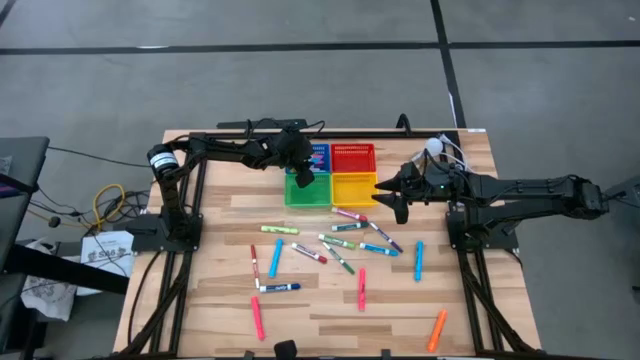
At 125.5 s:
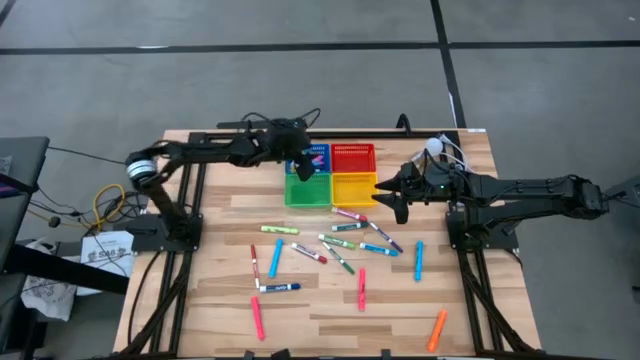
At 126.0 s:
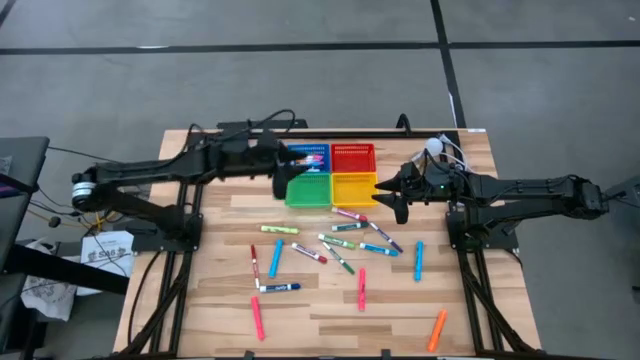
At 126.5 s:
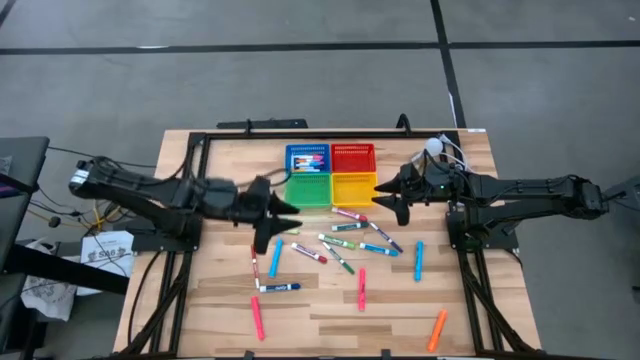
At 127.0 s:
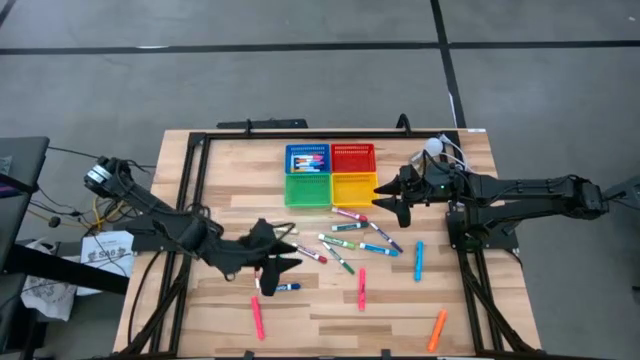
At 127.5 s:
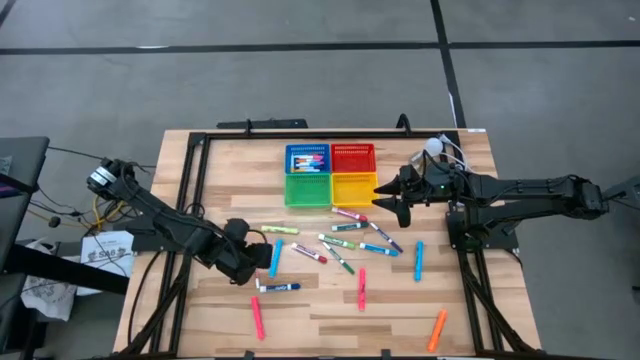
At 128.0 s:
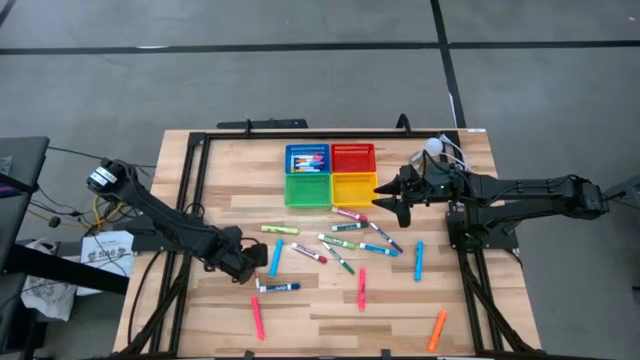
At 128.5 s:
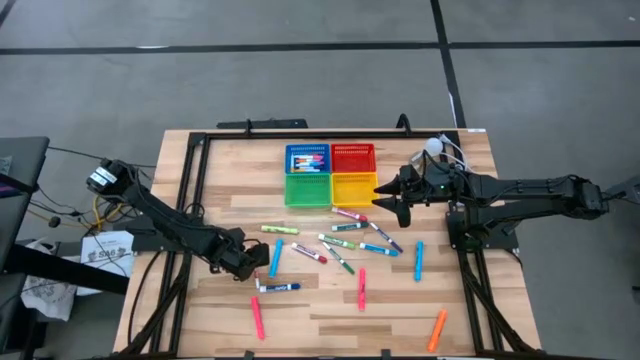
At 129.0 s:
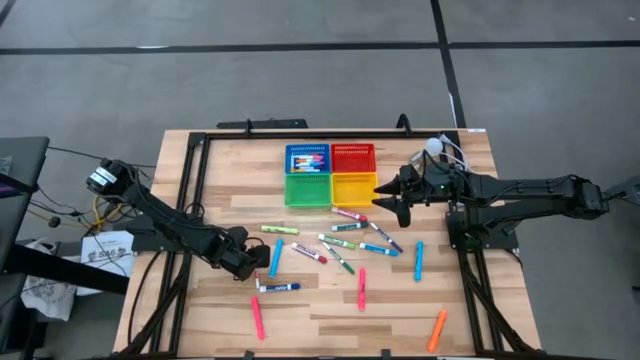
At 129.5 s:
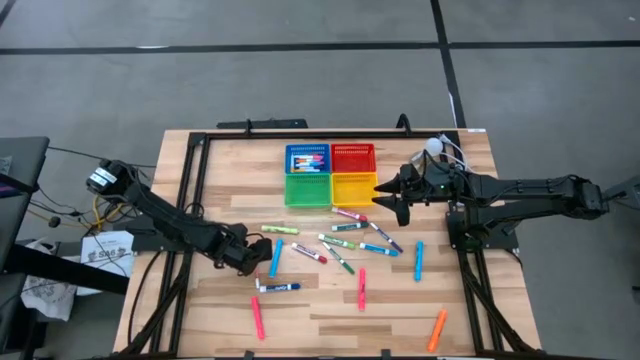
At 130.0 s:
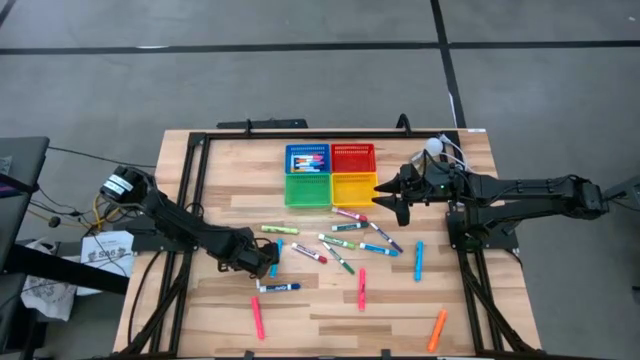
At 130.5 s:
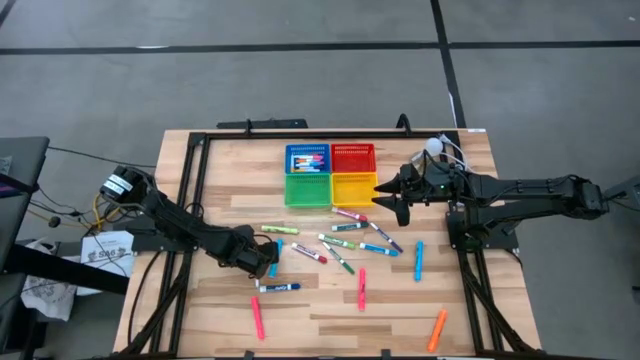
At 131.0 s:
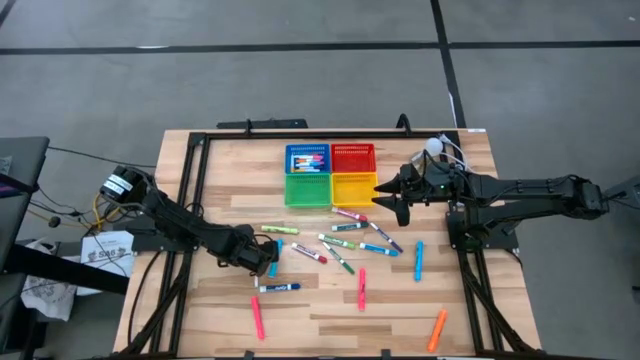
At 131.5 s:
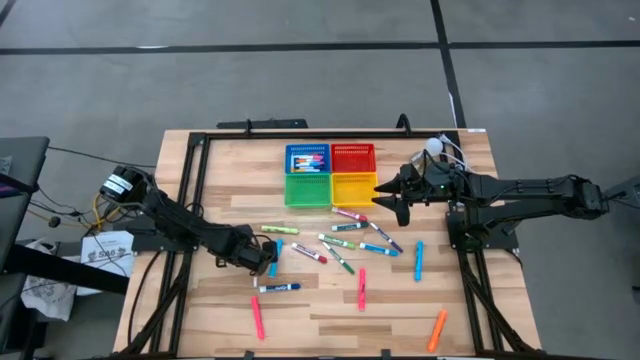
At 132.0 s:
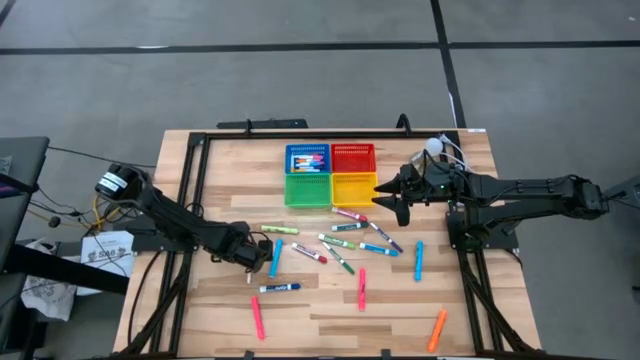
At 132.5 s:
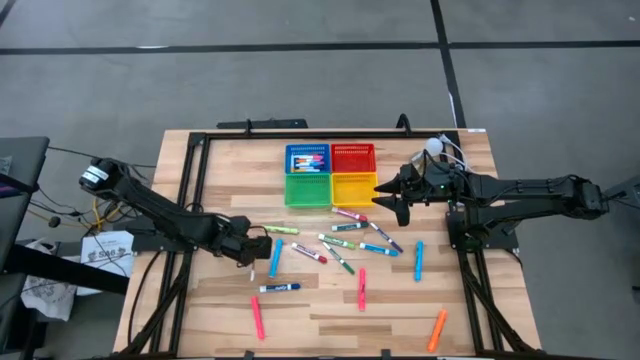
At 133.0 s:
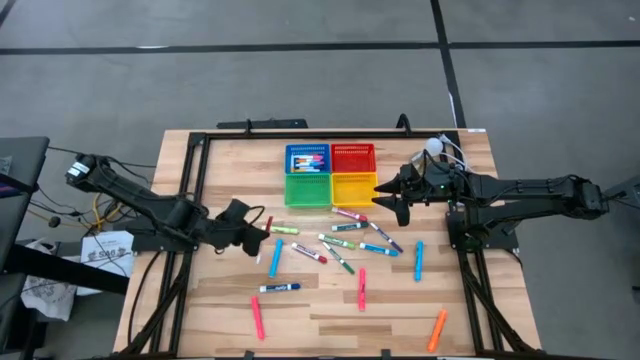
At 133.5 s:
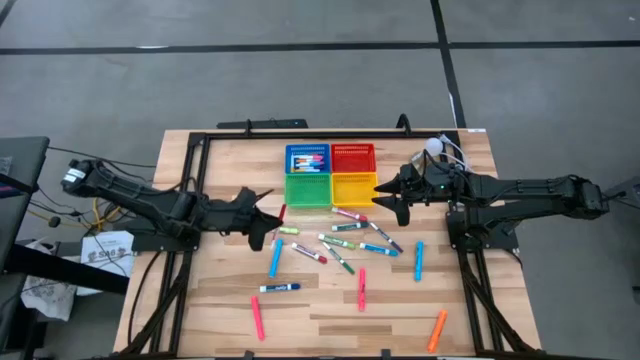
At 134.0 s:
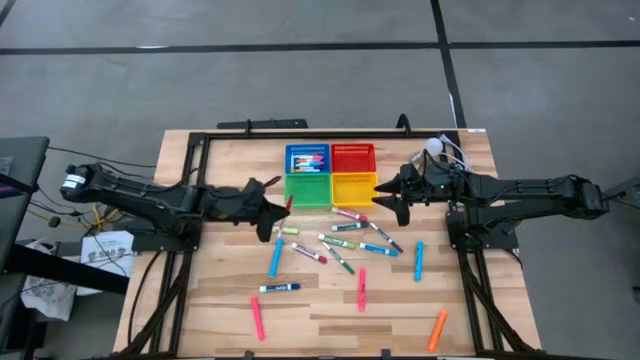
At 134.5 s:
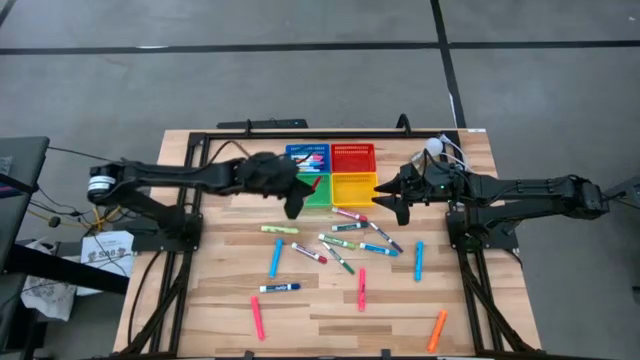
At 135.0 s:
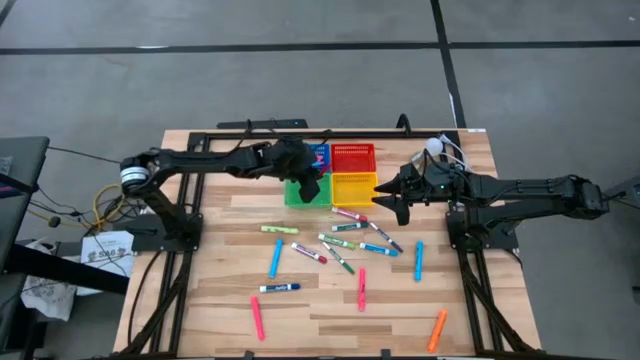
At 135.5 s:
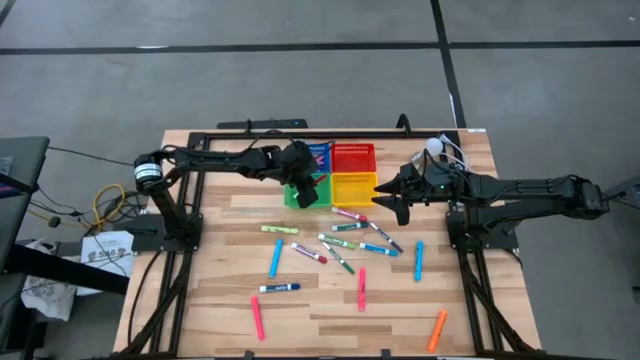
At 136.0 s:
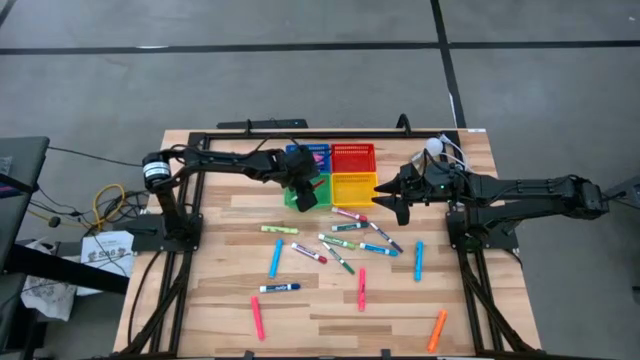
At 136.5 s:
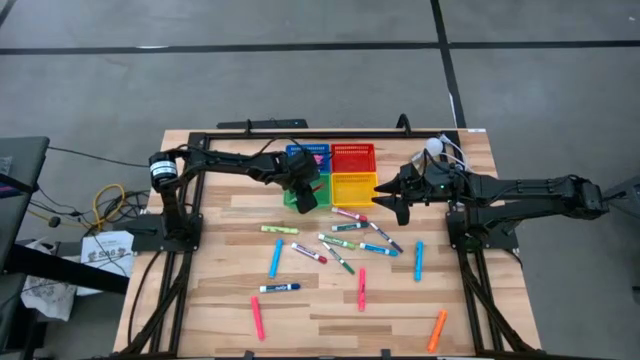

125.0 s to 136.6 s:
Task: Pick & Place Markers
Put the medium red marker into the green bin

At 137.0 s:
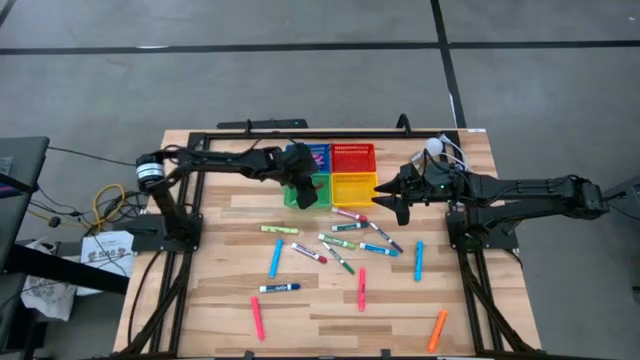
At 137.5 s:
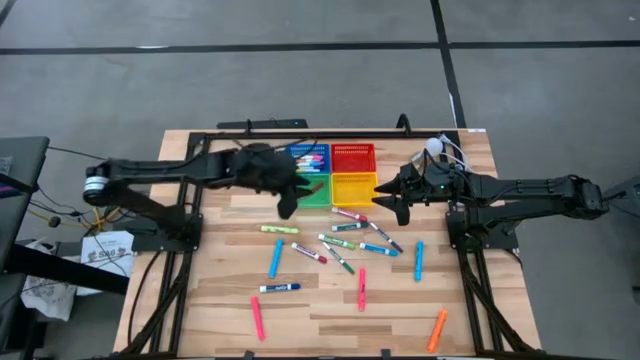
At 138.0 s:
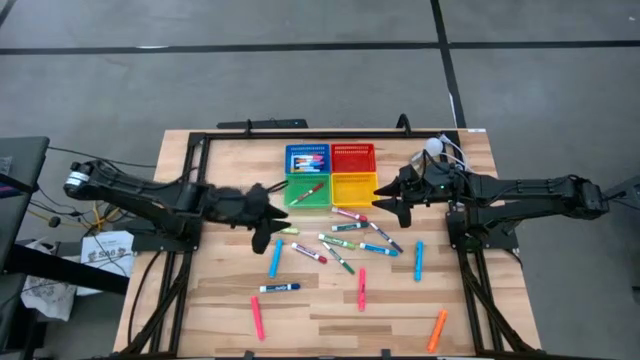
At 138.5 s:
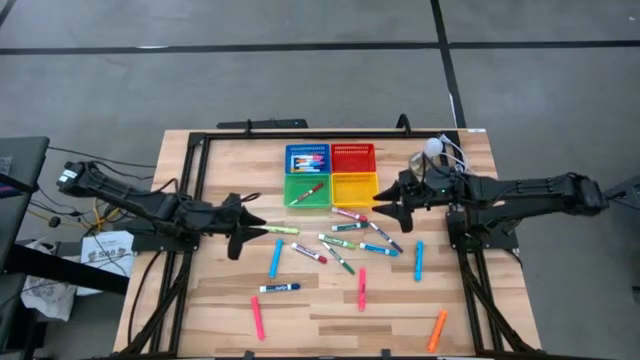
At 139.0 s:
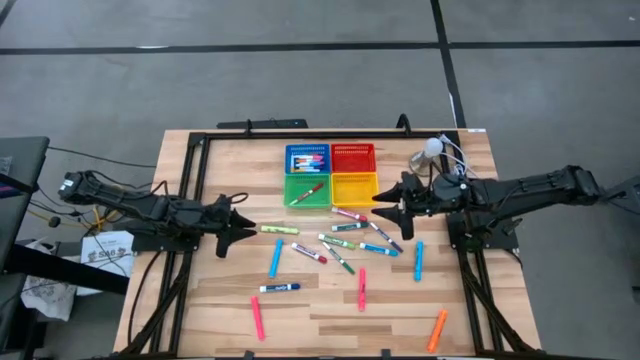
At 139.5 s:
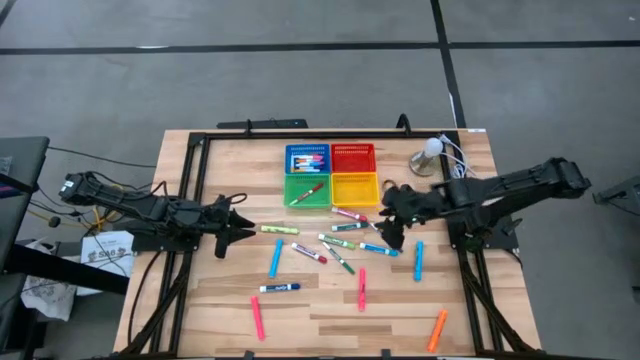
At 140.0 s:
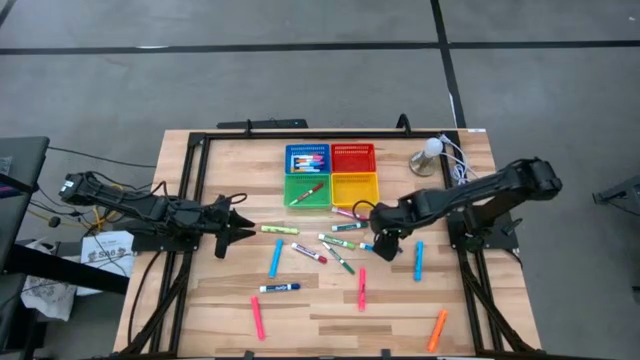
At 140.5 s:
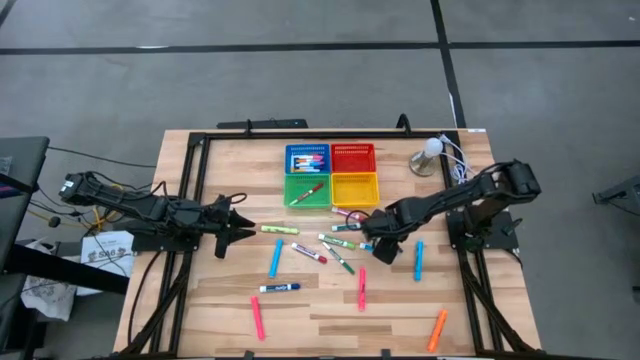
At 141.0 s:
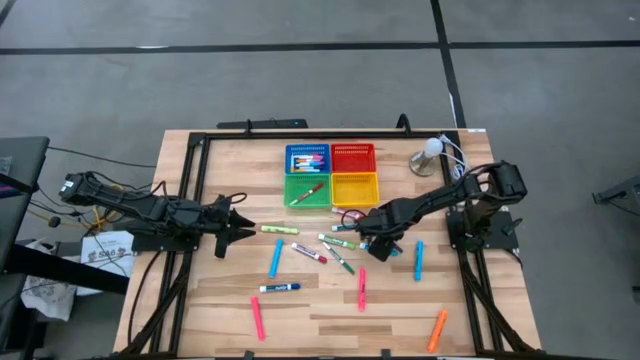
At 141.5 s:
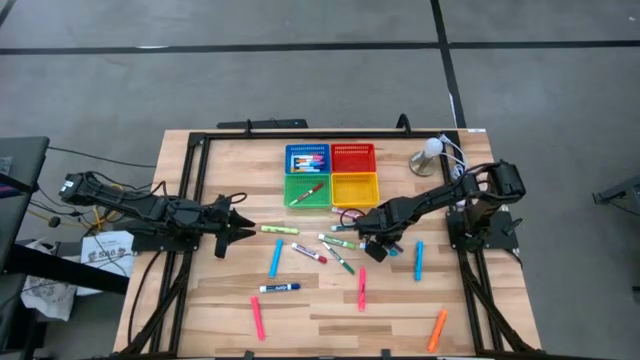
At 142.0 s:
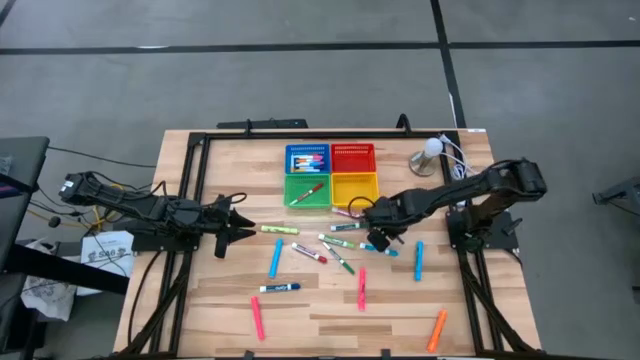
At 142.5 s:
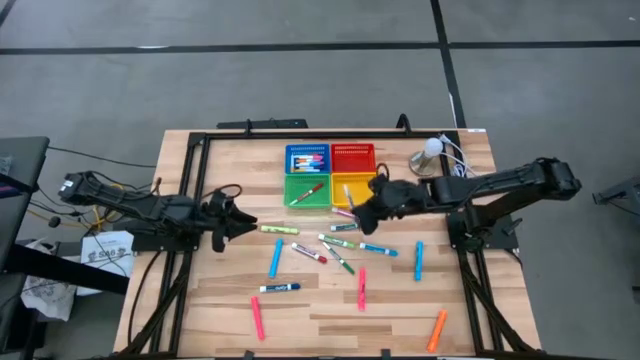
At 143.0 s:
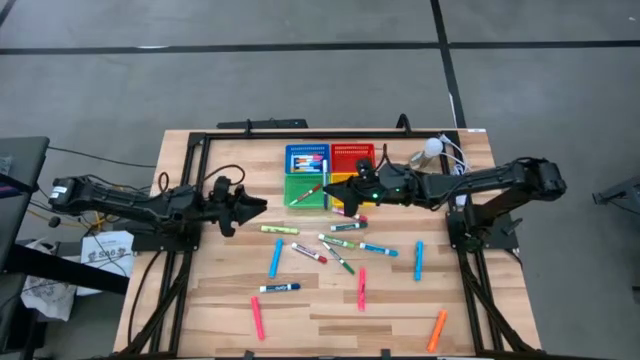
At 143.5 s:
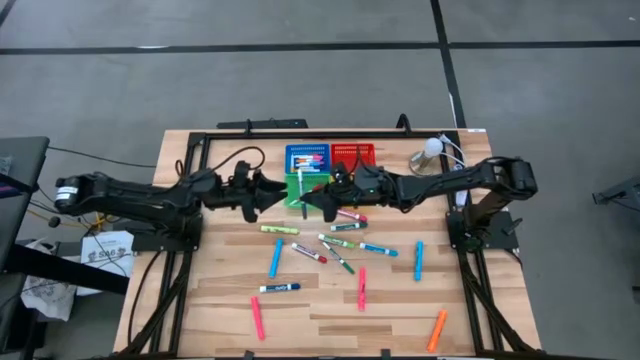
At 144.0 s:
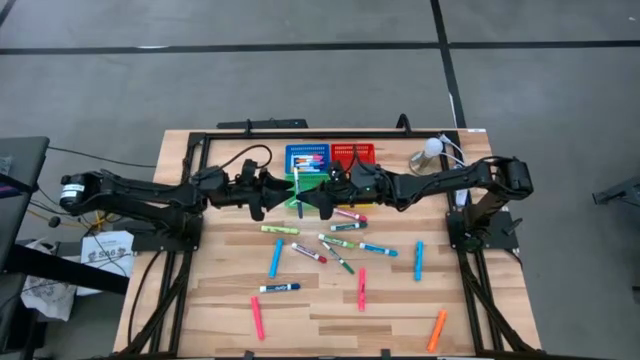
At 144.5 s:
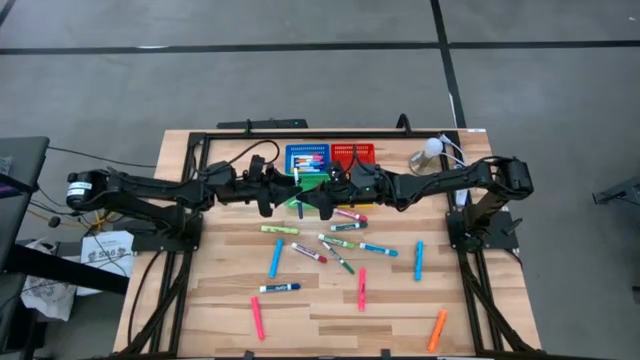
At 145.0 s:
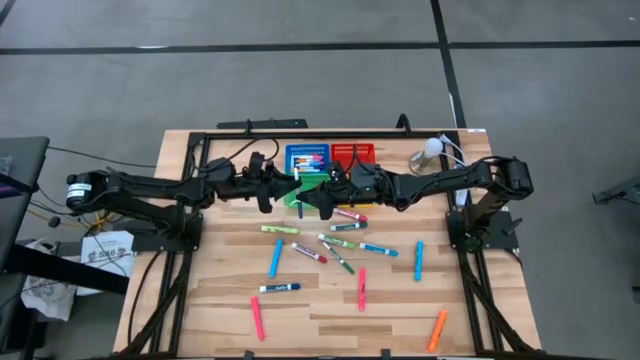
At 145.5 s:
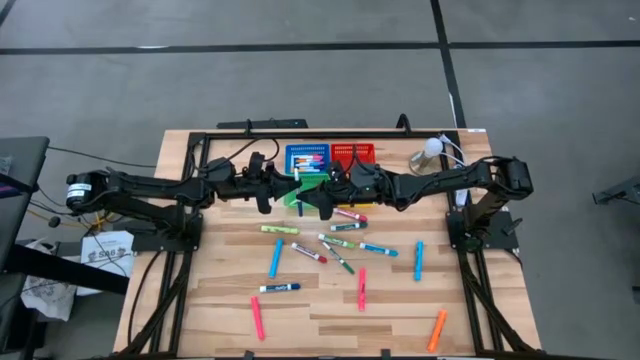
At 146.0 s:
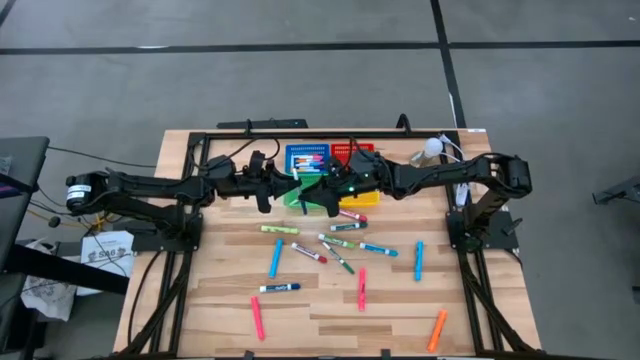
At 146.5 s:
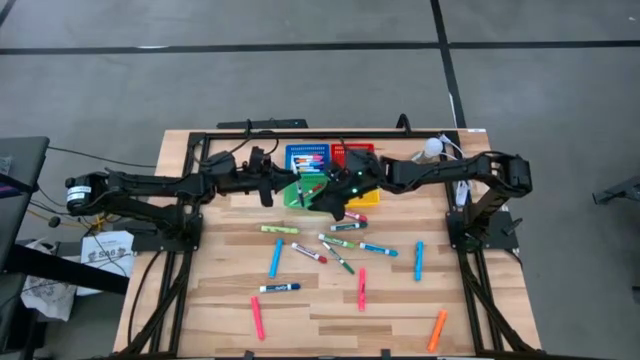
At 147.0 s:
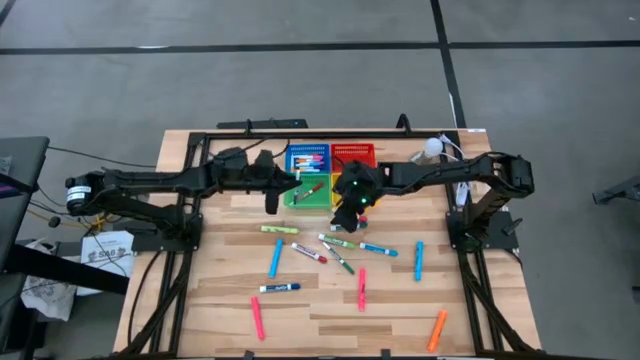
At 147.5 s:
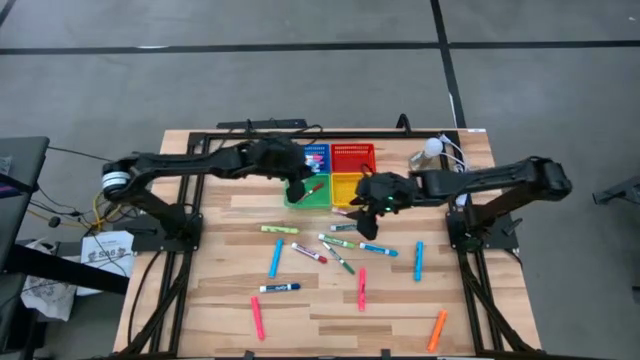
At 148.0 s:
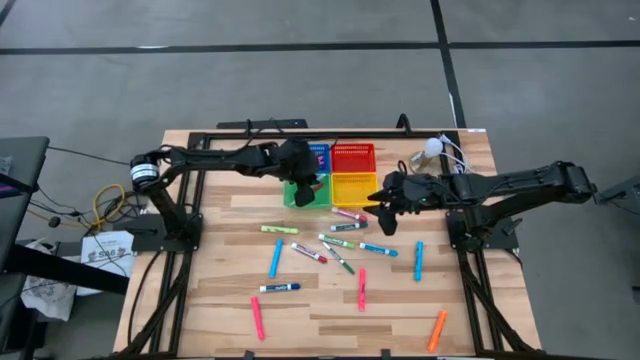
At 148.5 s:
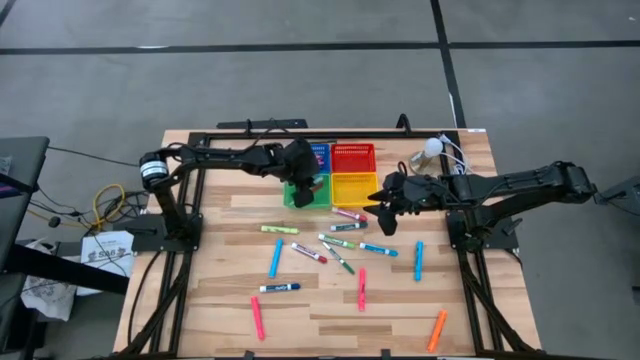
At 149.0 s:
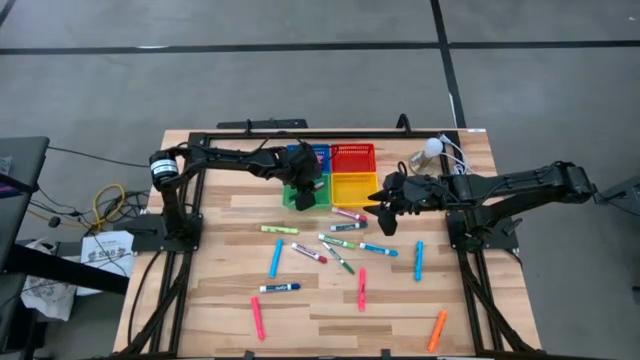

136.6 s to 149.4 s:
Put the medium dark blue marker into the green bin
